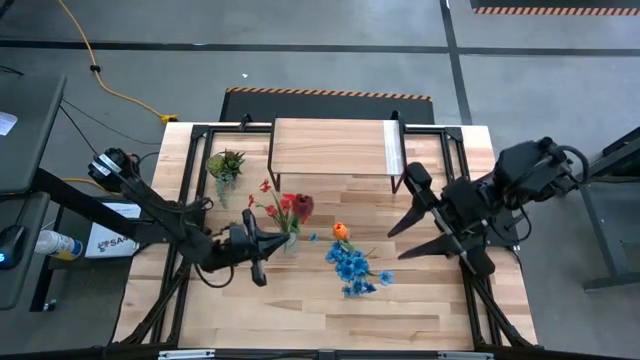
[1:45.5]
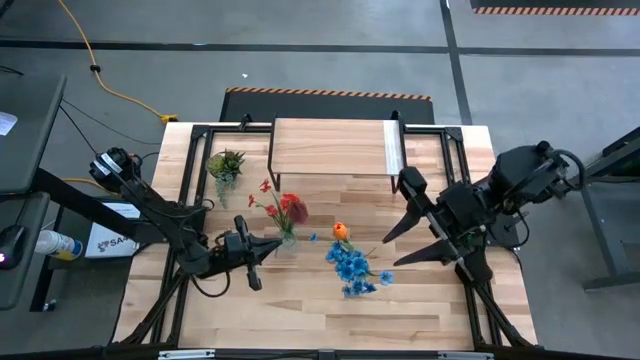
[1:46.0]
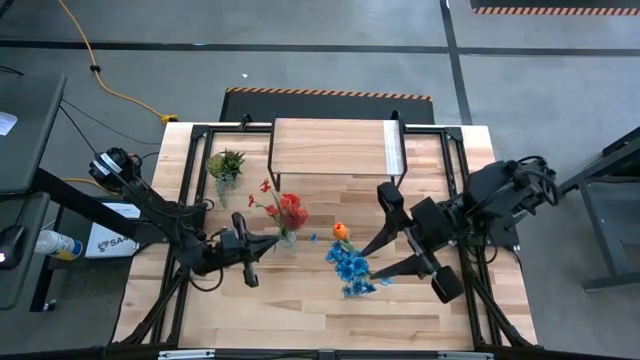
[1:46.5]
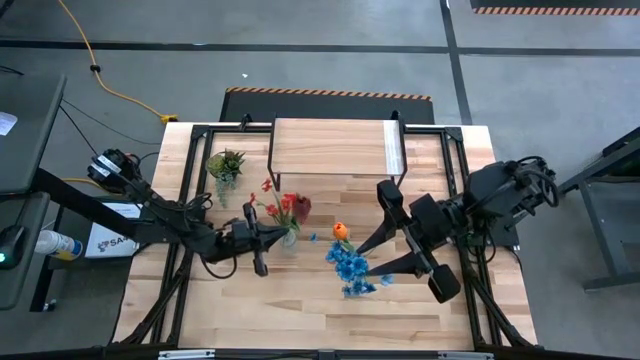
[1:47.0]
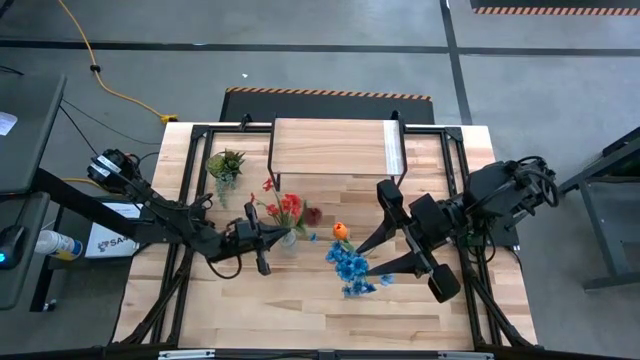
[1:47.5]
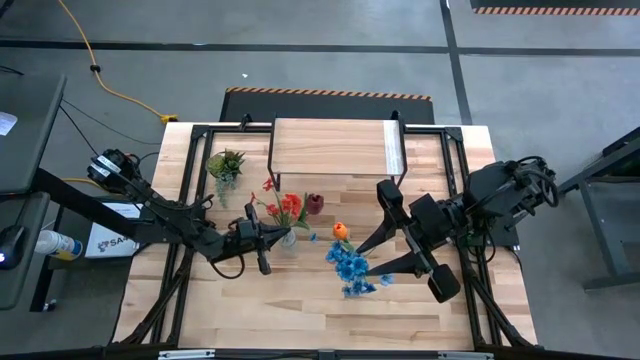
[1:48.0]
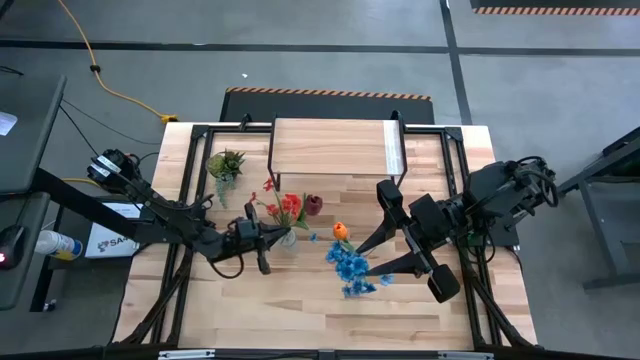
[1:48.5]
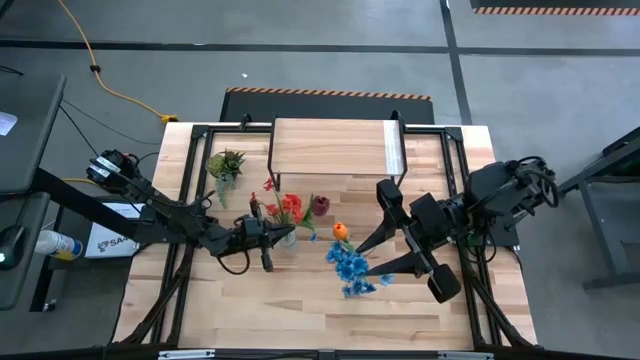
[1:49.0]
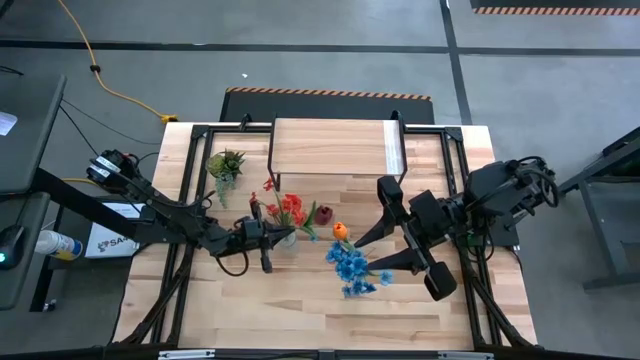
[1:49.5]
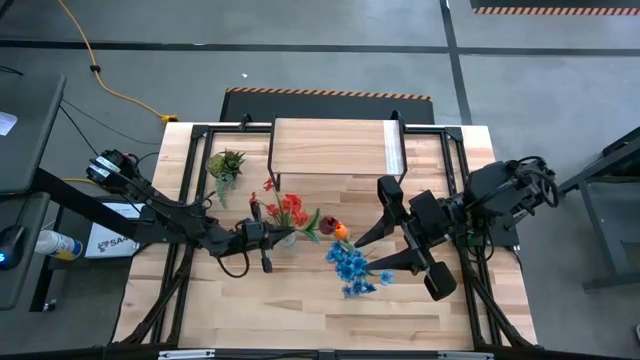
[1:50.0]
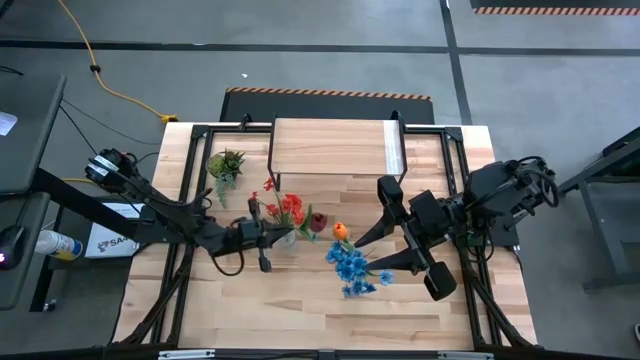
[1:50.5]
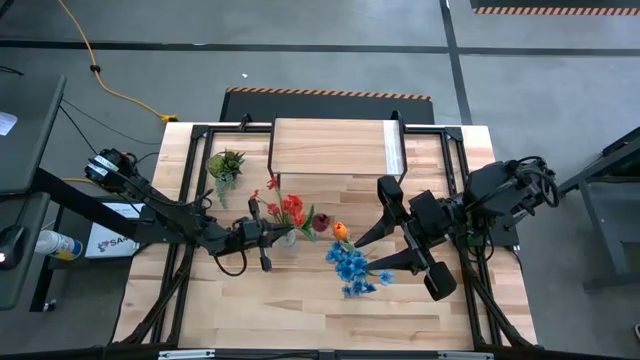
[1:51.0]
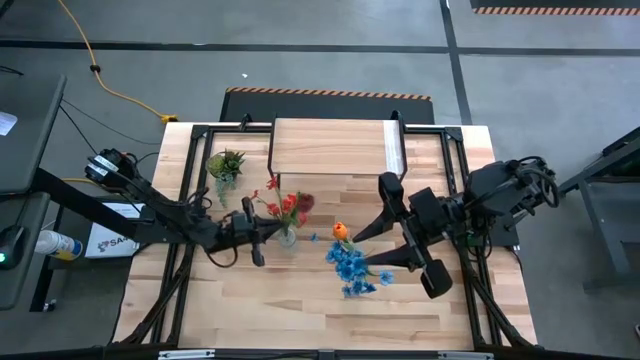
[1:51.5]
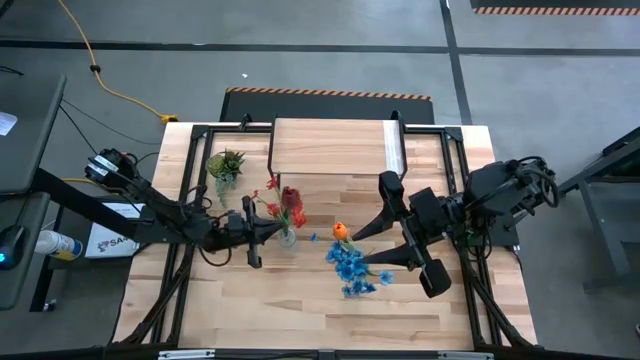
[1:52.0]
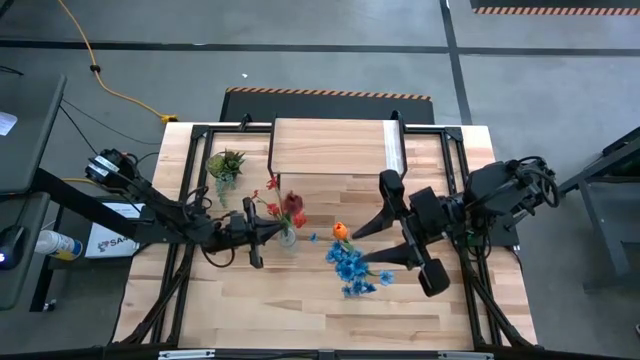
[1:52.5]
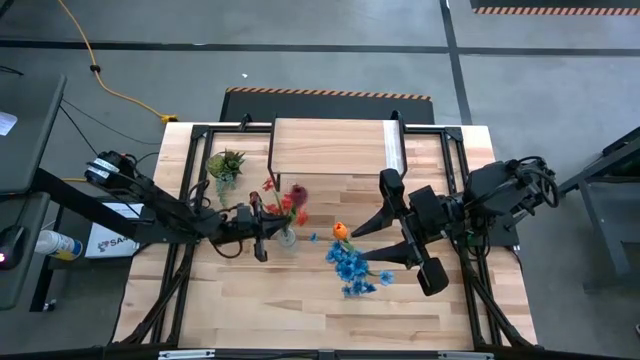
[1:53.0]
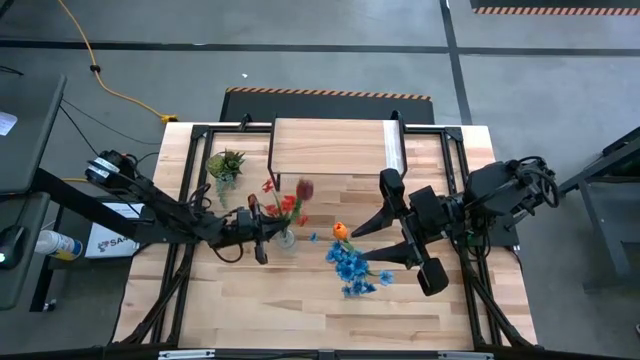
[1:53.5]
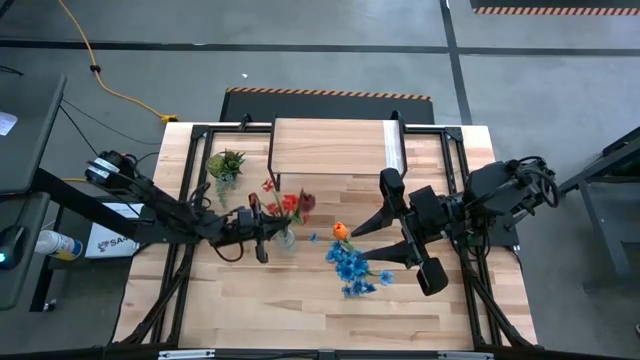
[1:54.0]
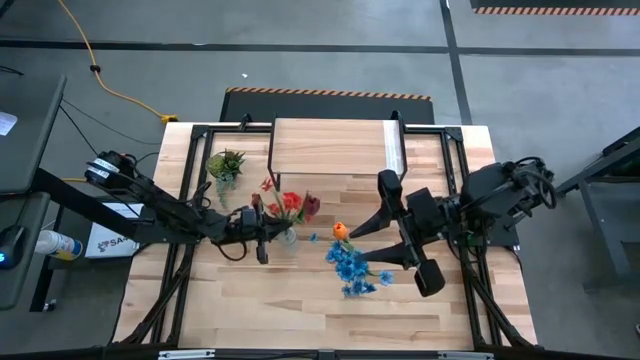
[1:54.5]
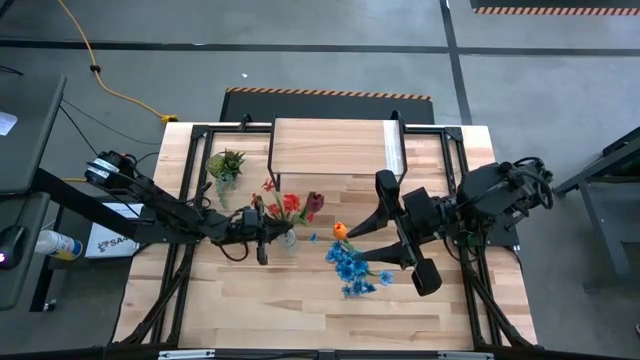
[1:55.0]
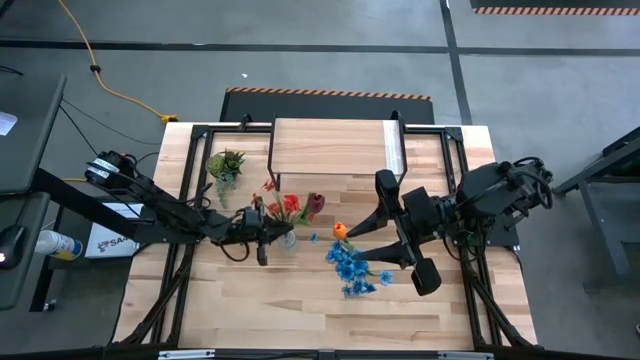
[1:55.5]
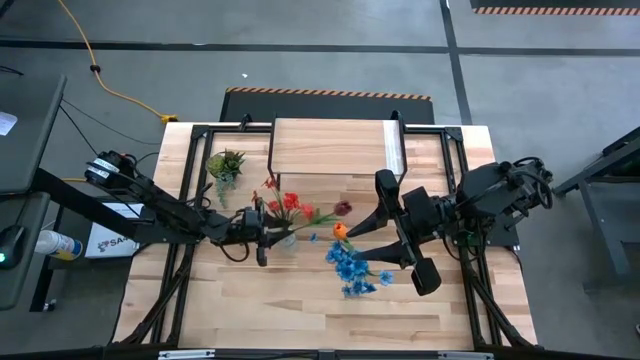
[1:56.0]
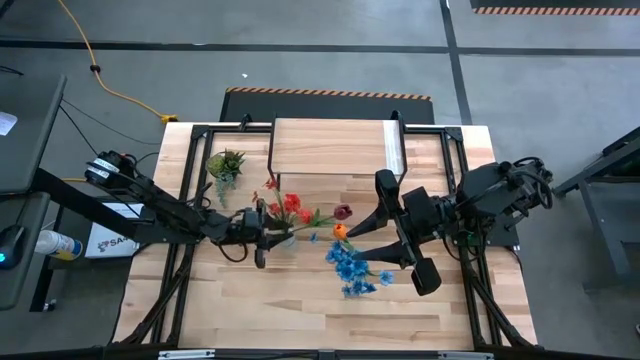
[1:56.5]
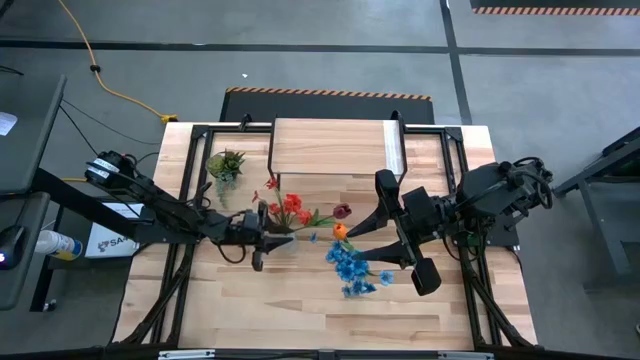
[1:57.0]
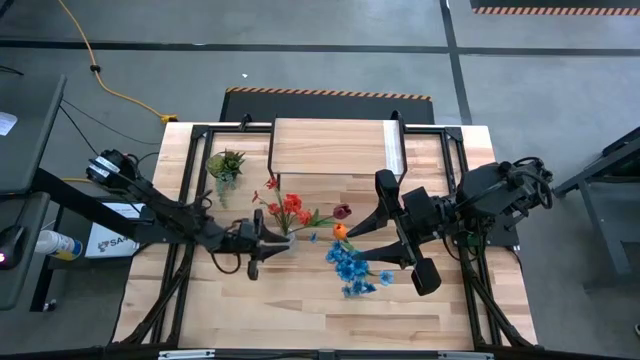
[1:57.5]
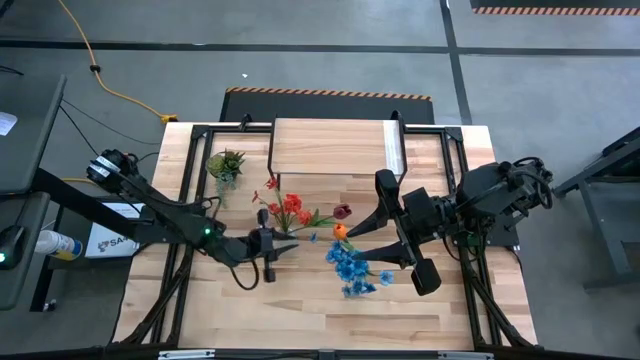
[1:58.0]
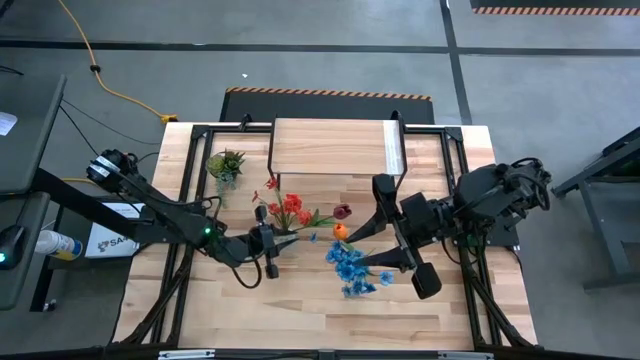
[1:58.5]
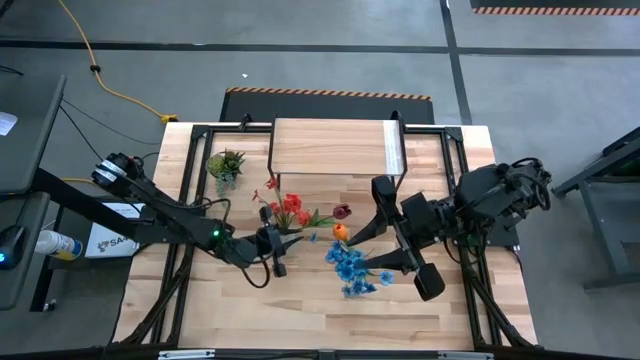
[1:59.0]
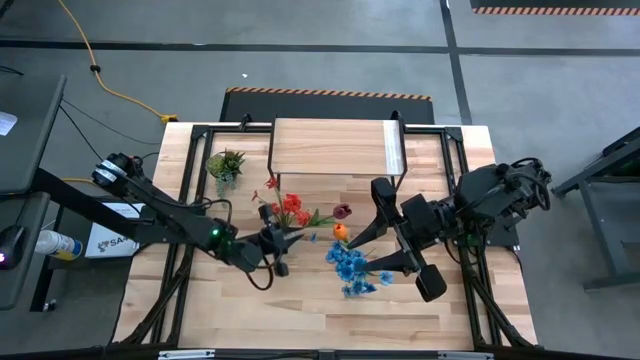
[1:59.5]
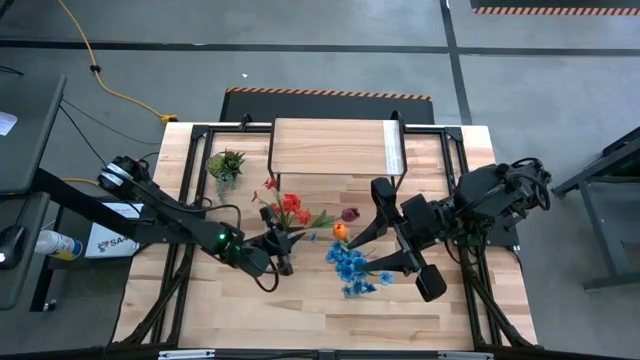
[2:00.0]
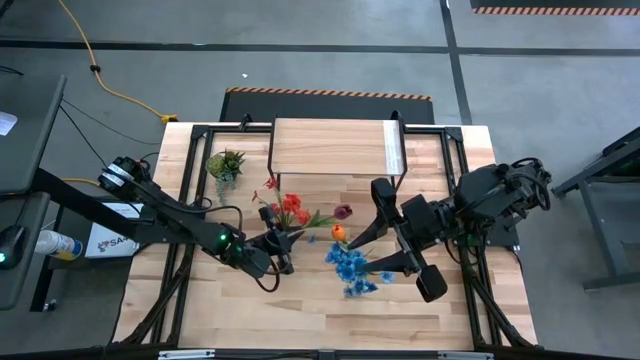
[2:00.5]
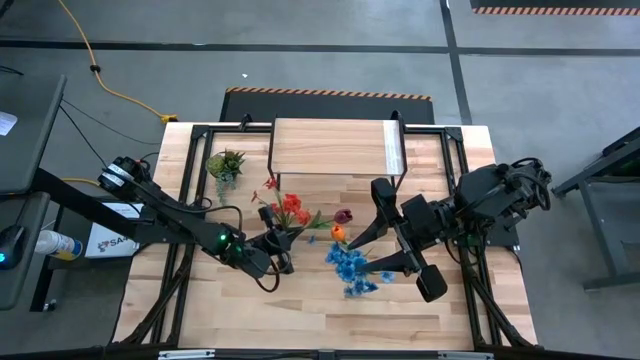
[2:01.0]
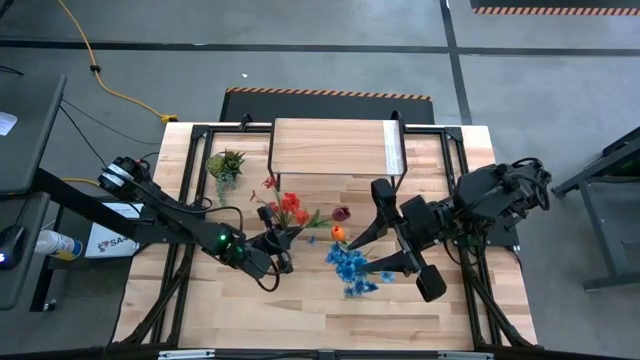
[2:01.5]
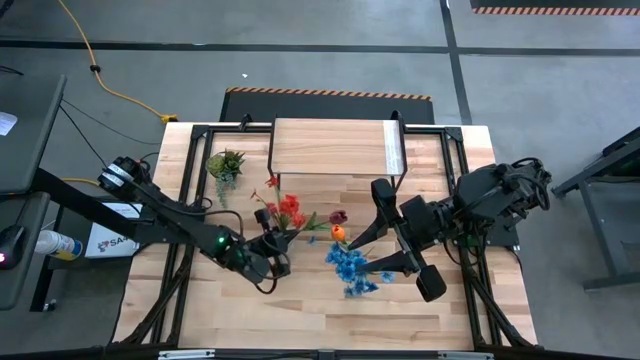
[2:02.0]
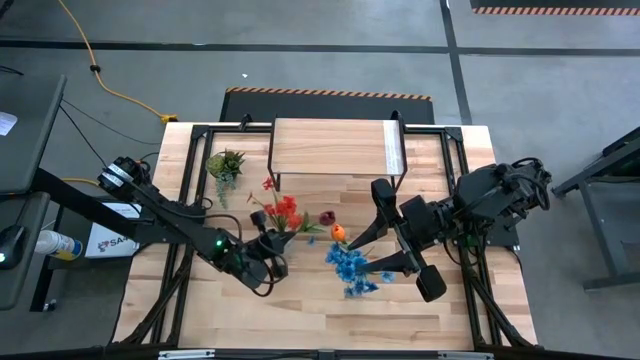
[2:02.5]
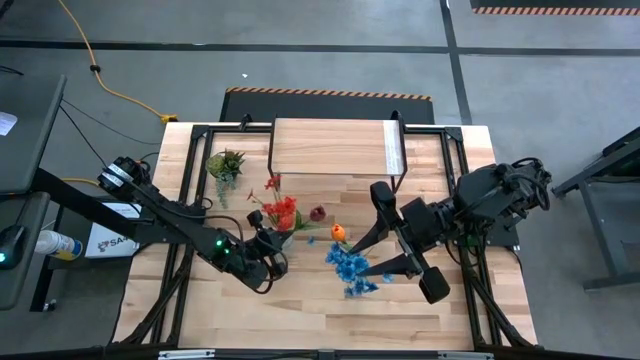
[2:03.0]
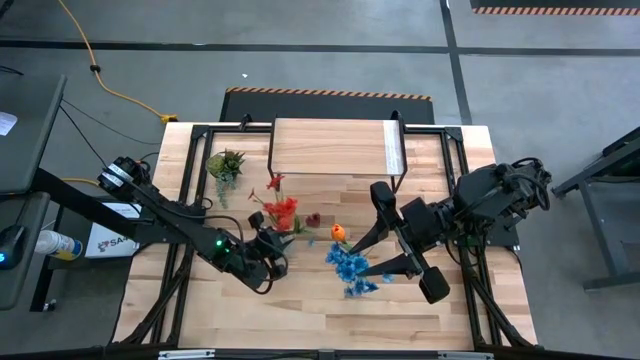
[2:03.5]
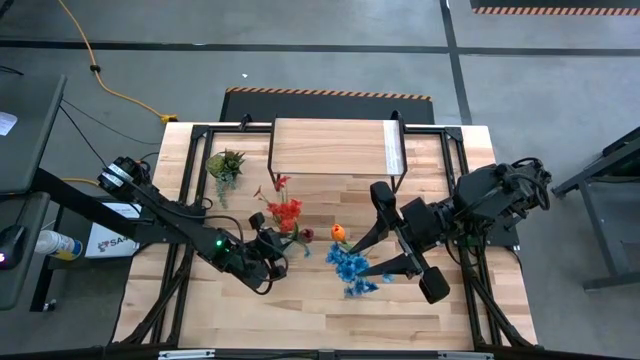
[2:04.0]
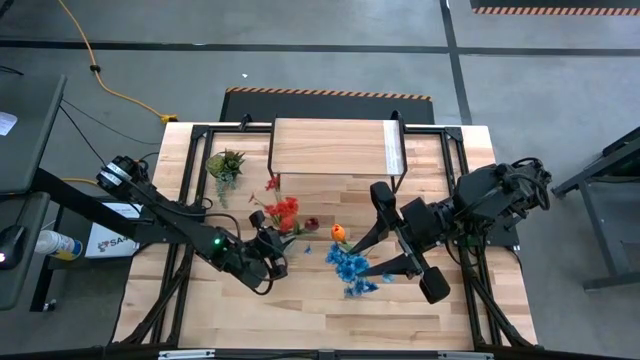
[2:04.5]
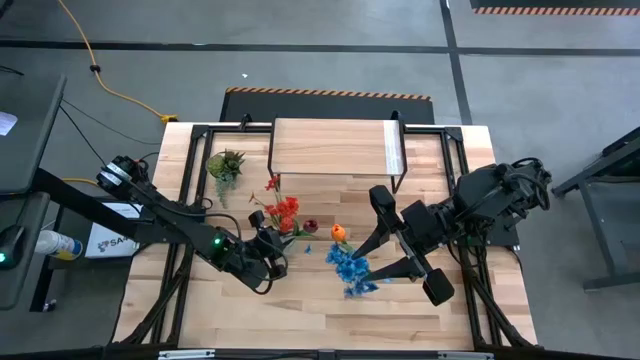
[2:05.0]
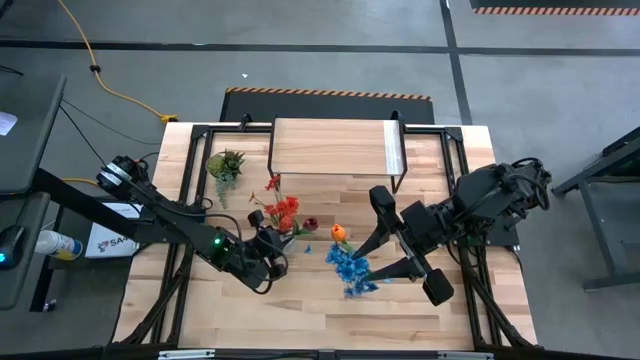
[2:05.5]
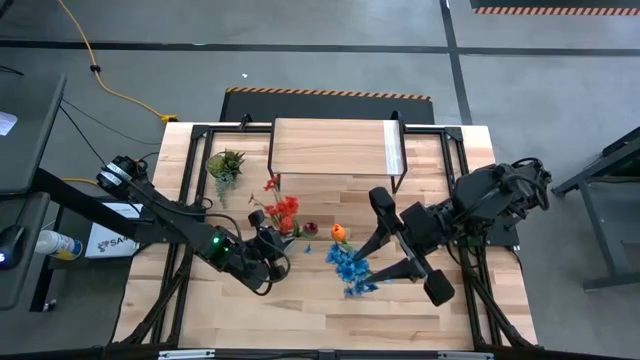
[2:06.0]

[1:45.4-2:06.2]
Task: Pick and place flowers into a vace then onto a shelf
Put the dark red flower into the left transparent vase
